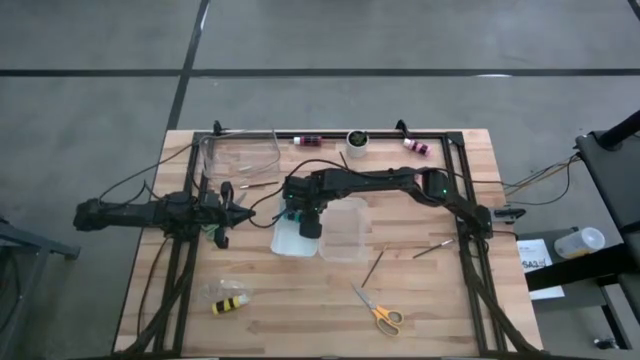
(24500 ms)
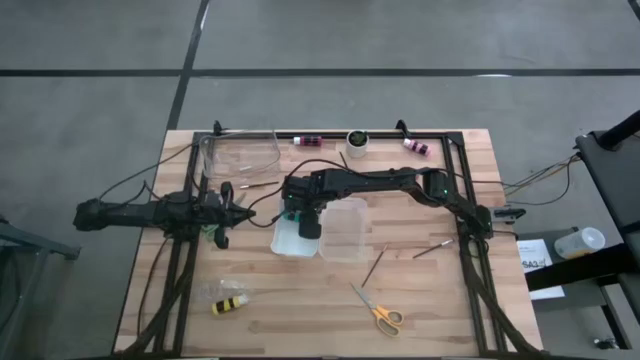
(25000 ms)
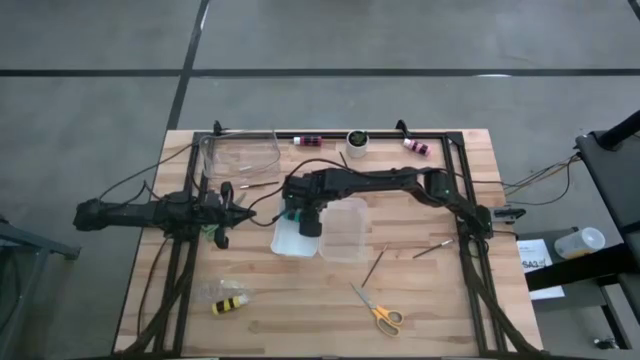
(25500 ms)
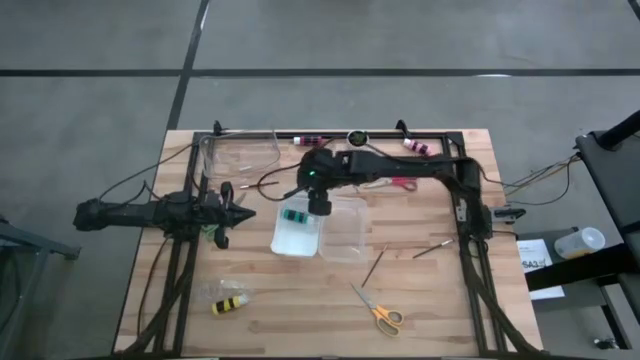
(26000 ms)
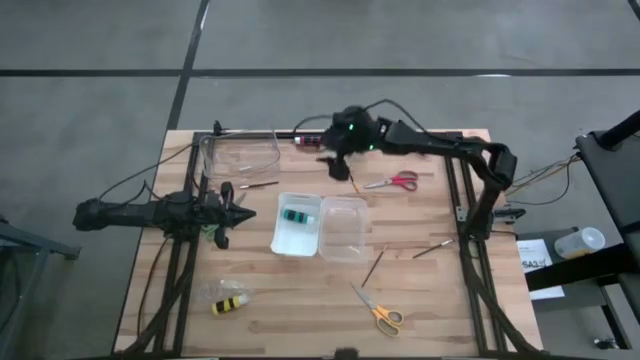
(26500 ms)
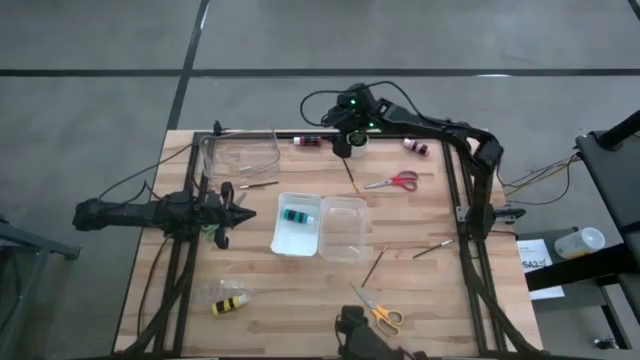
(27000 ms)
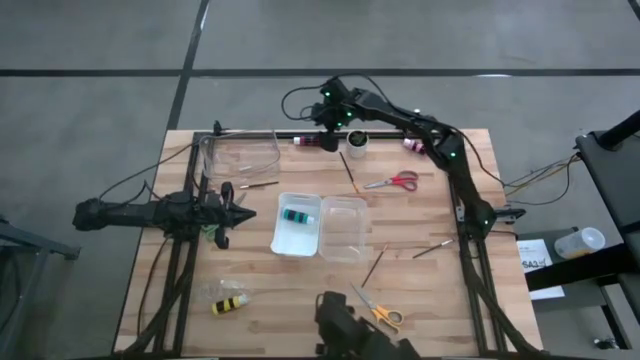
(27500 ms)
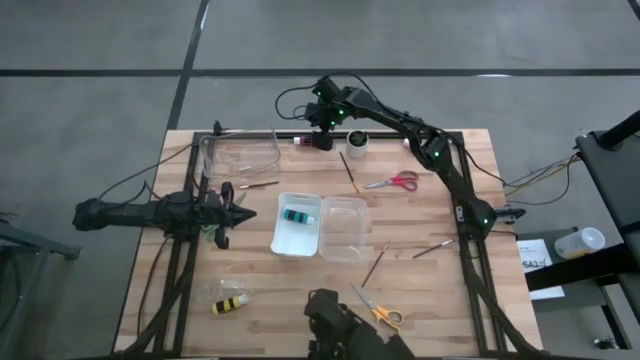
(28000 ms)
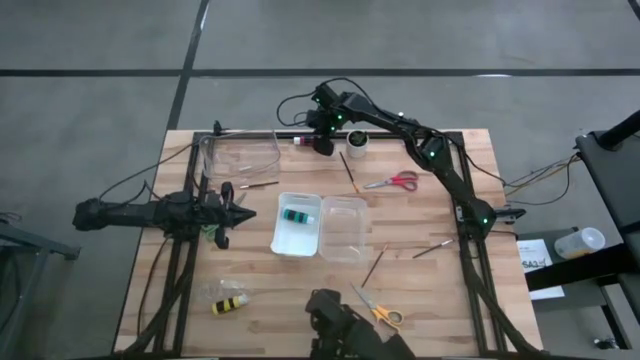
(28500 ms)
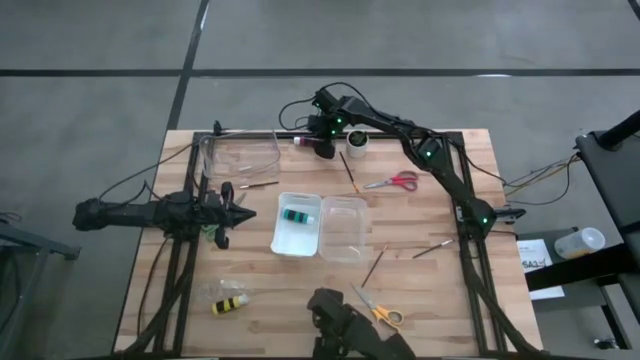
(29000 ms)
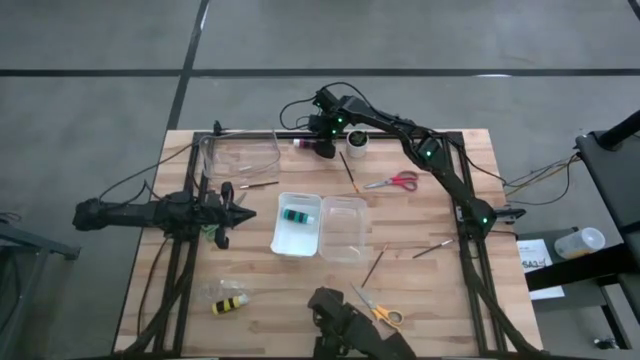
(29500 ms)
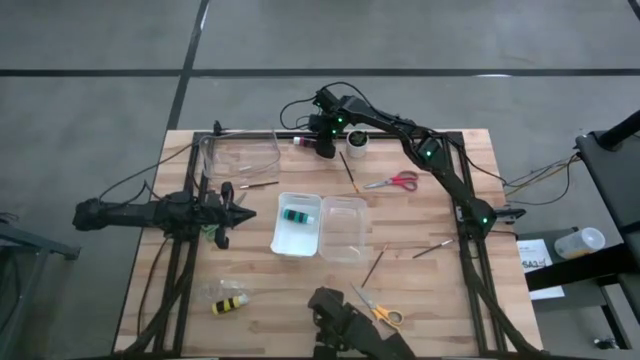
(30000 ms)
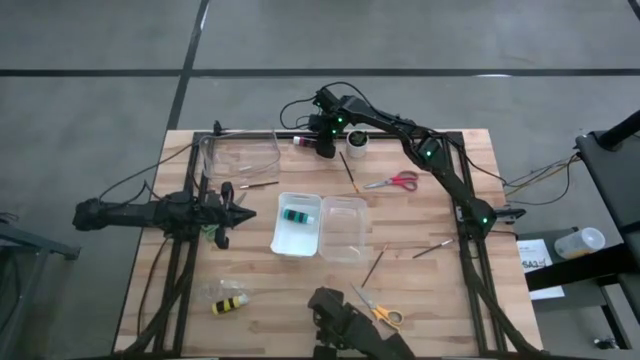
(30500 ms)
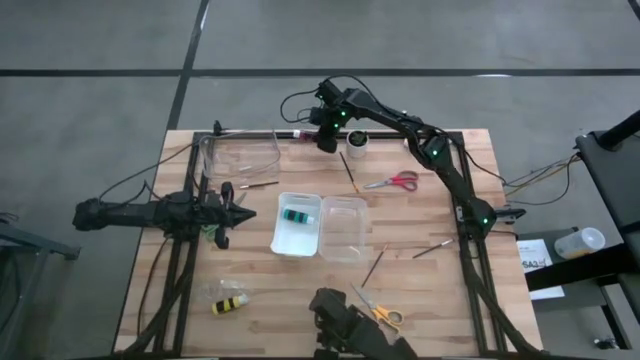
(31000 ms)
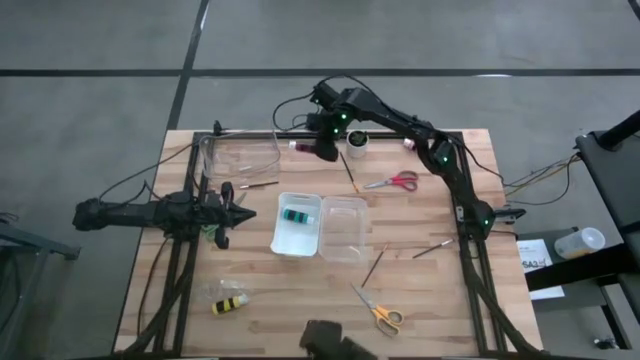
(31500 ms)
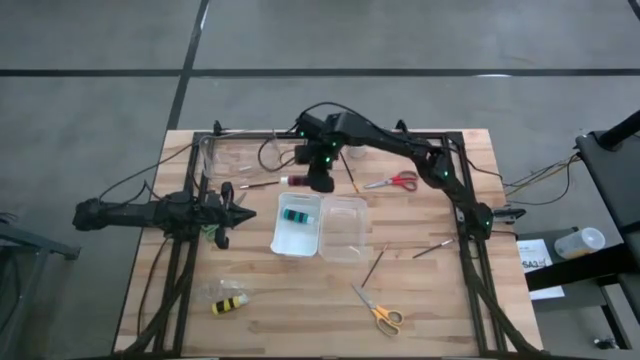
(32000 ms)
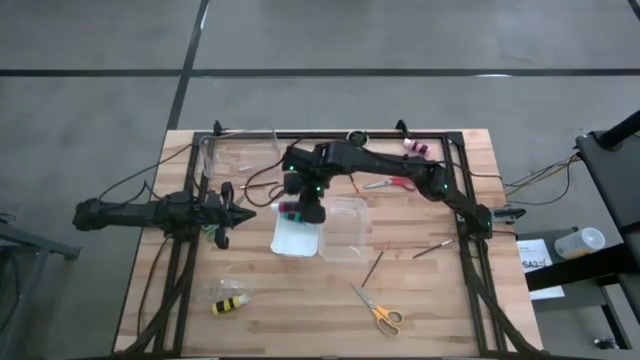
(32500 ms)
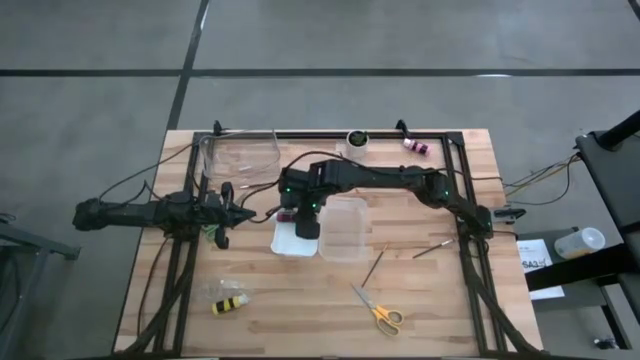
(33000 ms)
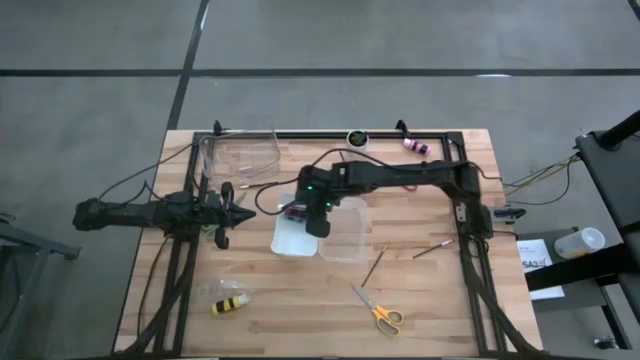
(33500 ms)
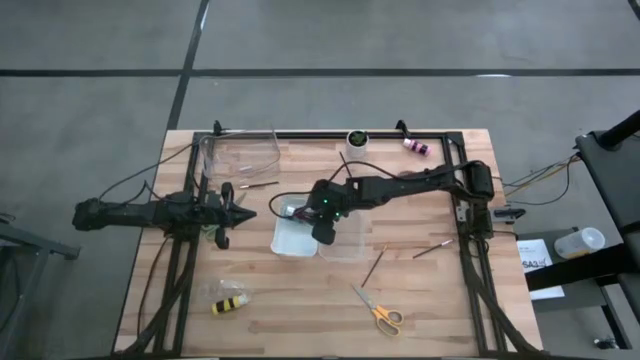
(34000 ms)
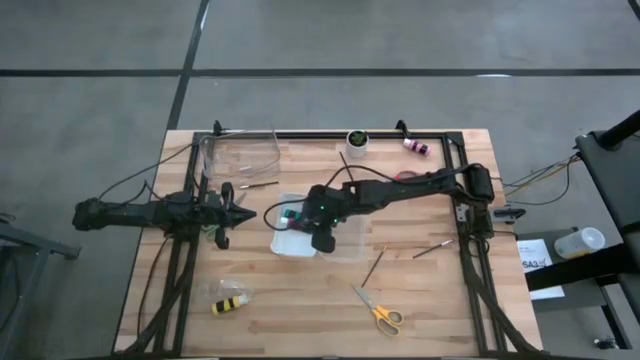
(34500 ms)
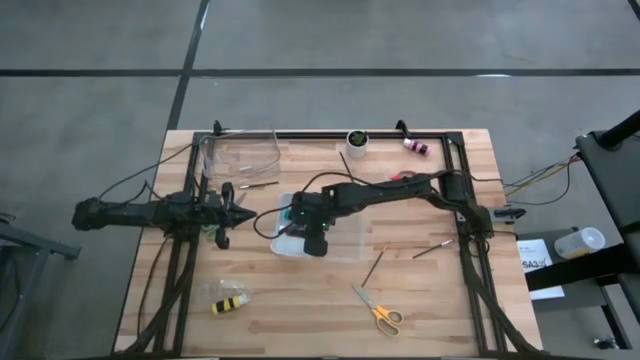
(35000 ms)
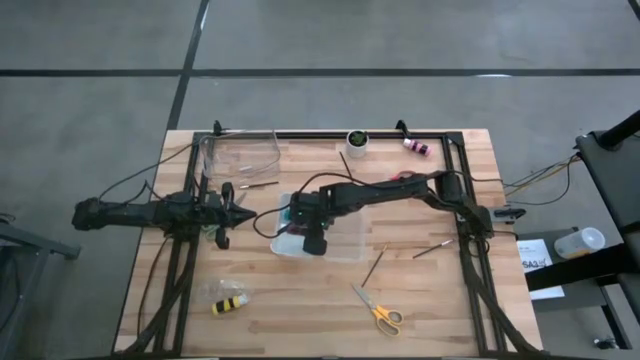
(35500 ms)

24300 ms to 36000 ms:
Task: Pick & Place Paint Supplies
Put the red paint bottle into the white bin

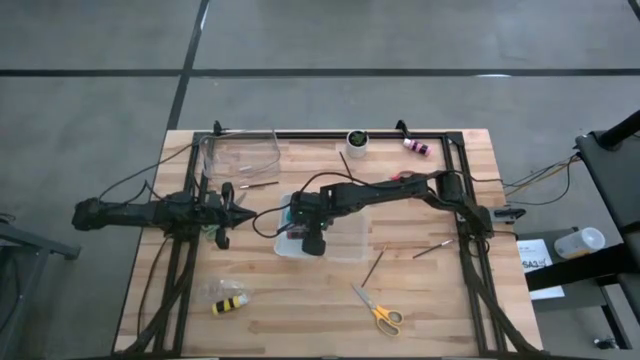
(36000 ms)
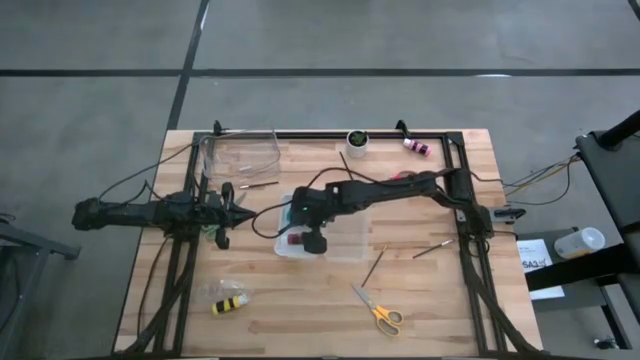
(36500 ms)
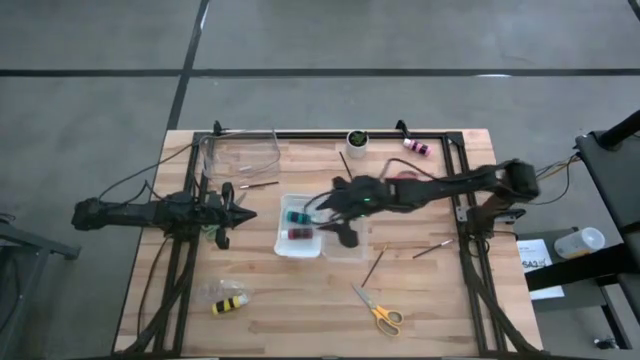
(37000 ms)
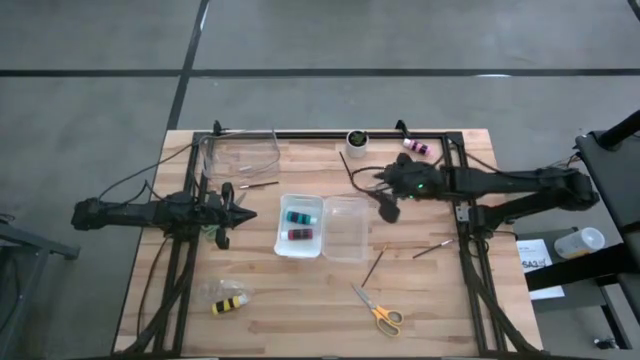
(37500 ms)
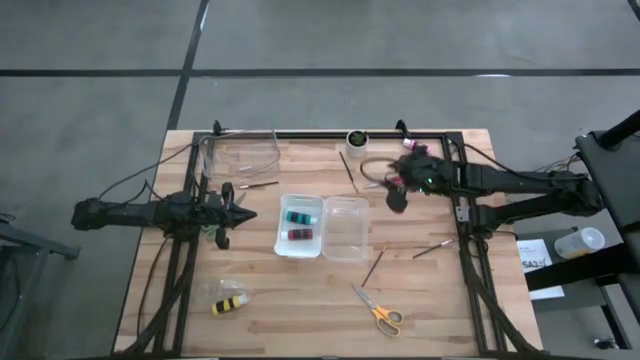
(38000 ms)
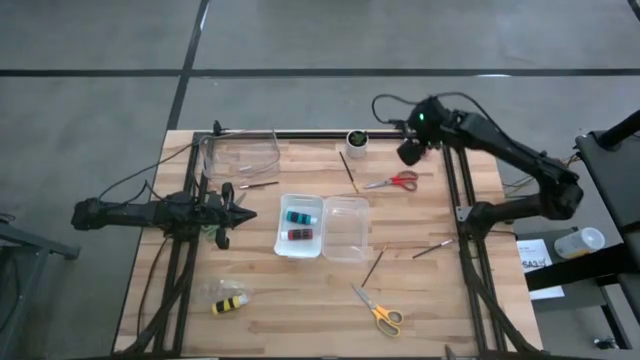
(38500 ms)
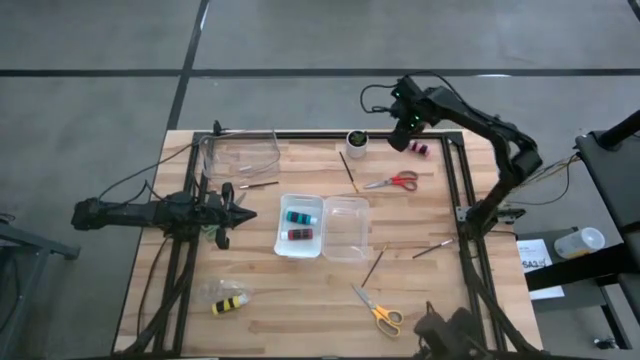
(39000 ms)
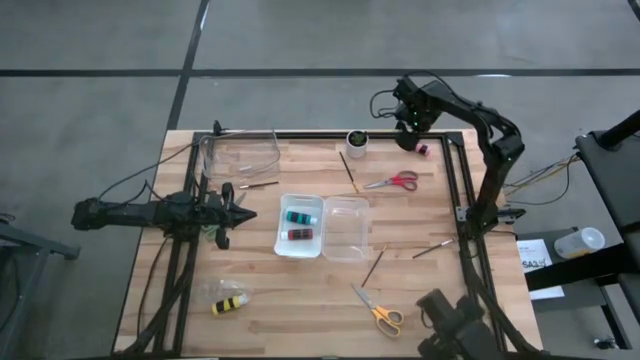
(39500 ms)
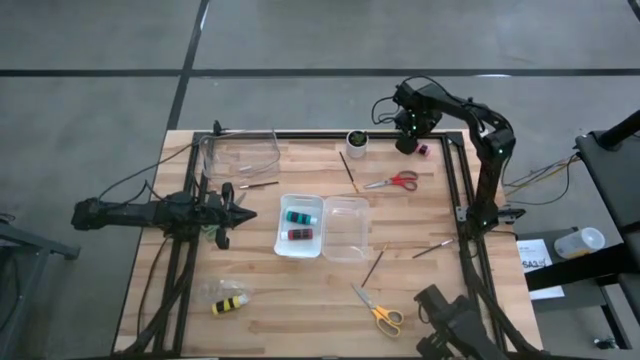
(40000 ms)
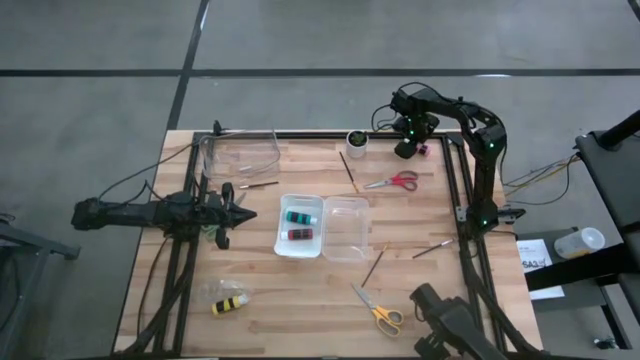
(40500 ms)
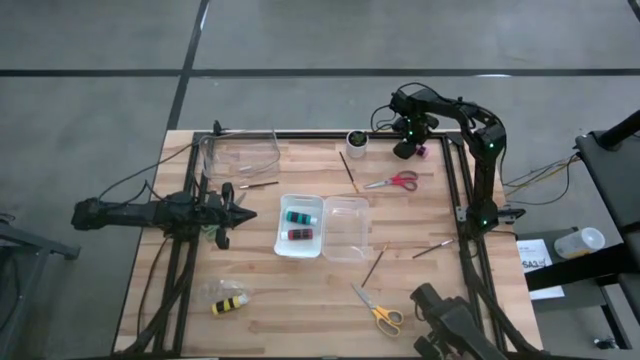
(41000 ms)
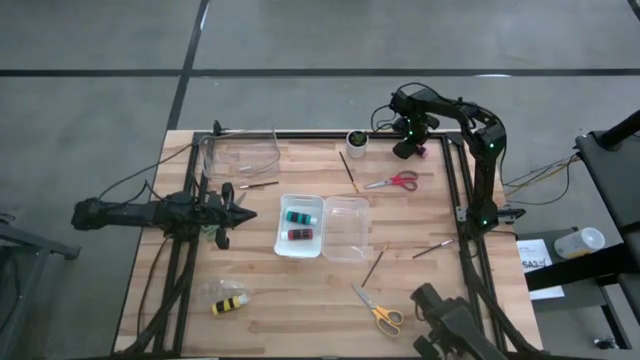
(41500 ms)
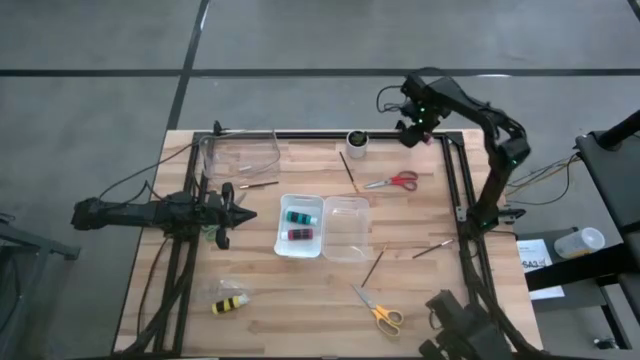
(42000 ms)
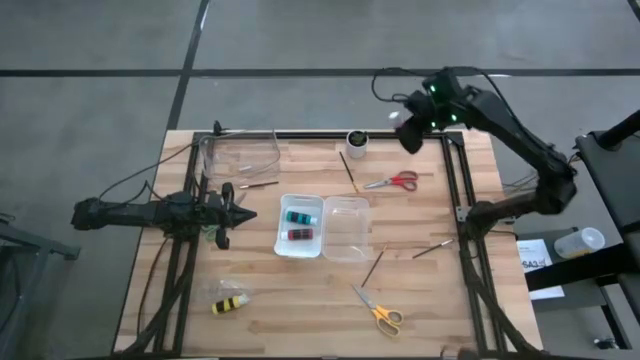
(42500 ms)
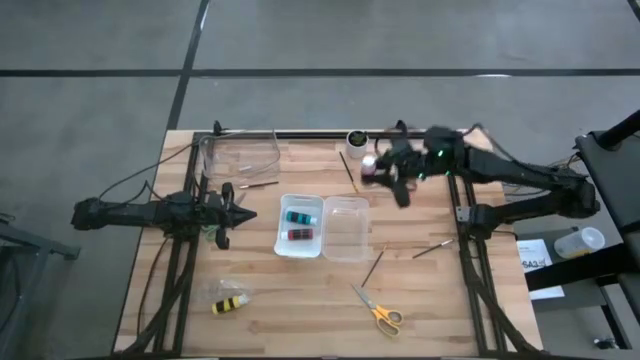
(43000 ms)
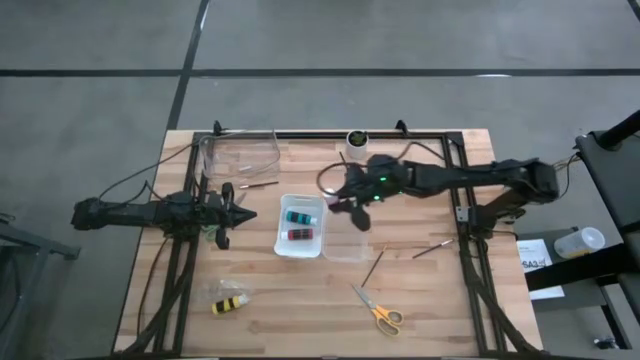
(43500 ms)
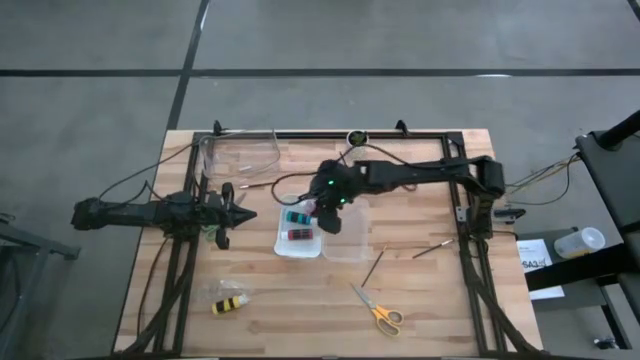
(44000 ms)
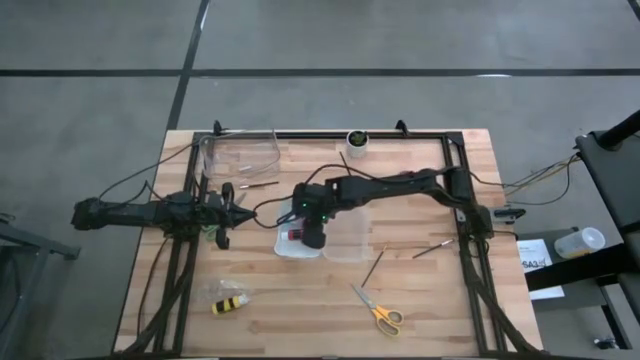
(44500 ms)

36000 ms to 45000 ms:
Put the pink paint bottle into the white bin

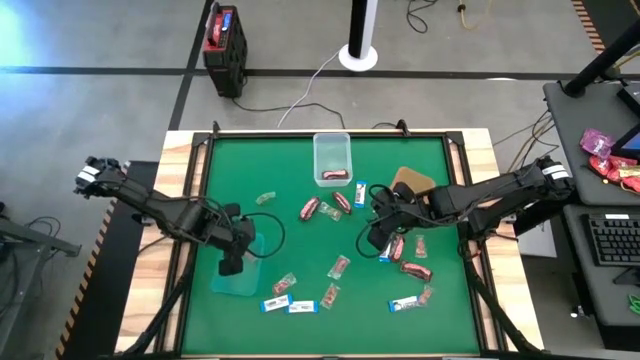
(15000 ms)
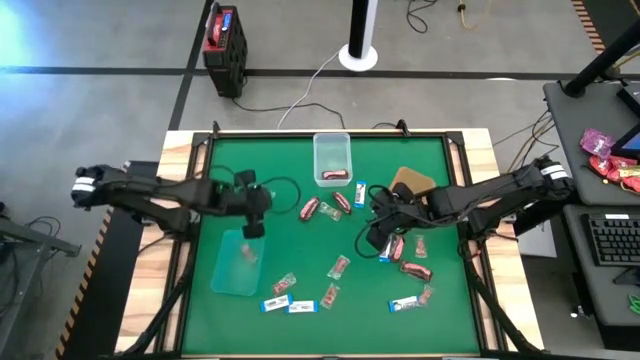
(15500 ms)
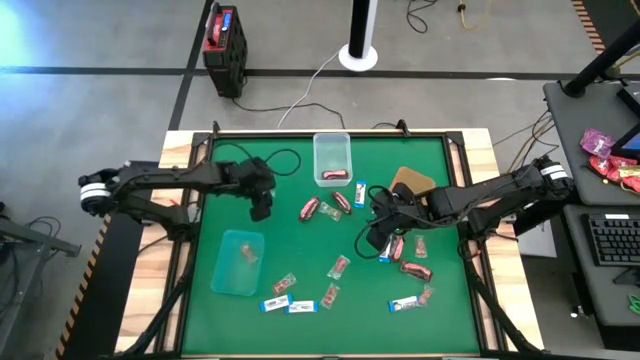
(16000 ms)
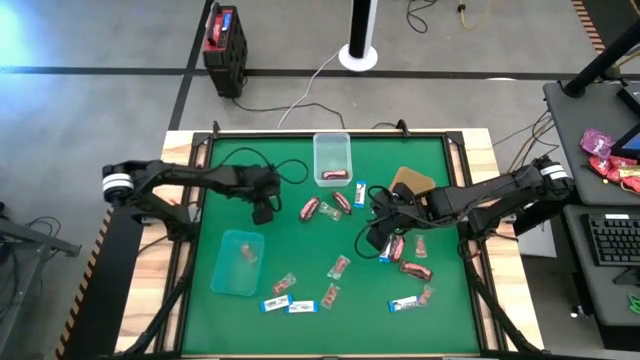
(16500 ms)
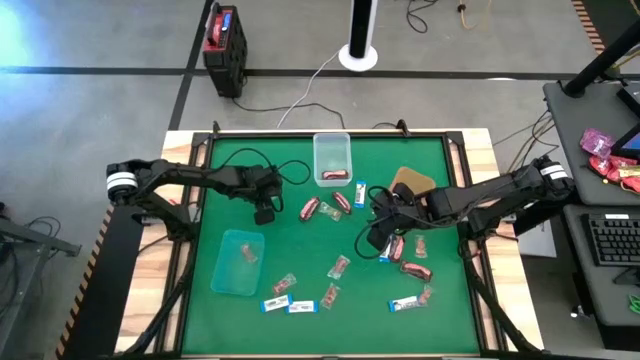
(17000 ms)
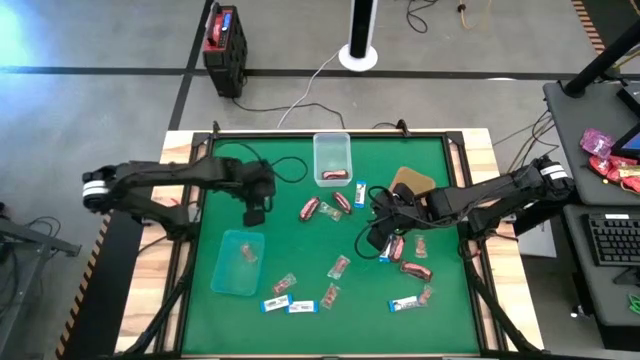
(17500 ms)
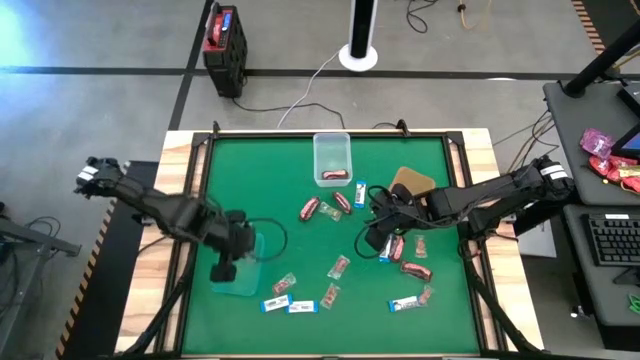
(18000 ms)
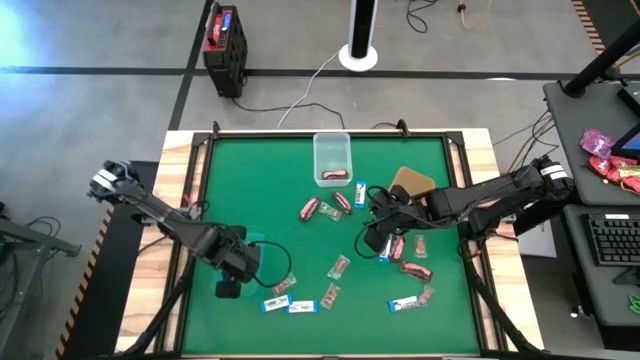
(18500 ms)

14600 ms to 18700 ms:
Task: Sort candy by brand, put in halloween buckets
Put the green gummy candy into the blue bin
